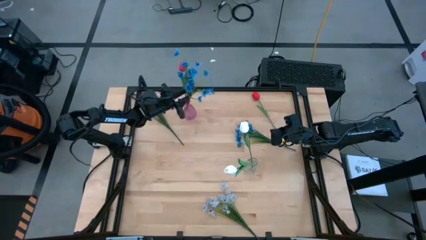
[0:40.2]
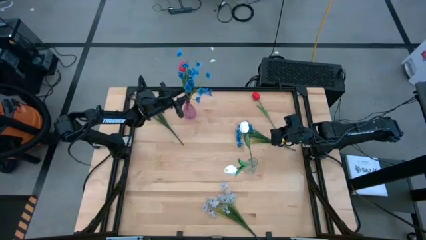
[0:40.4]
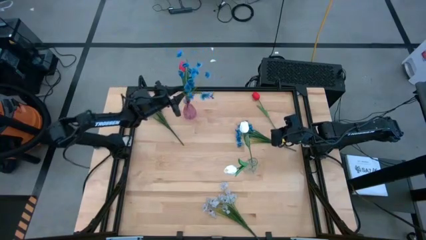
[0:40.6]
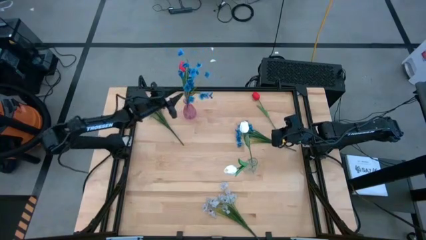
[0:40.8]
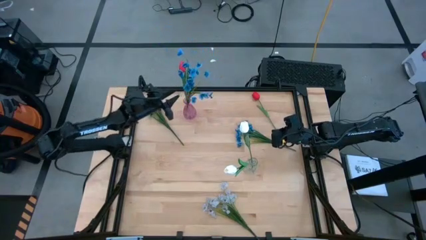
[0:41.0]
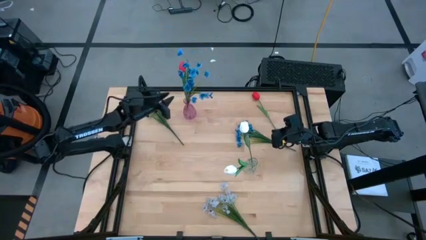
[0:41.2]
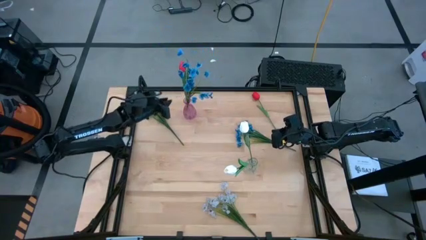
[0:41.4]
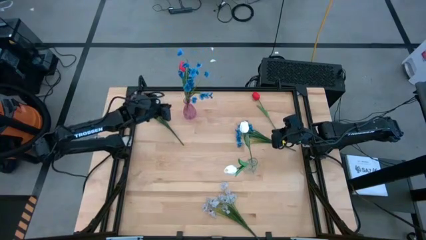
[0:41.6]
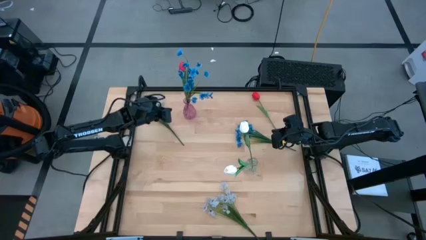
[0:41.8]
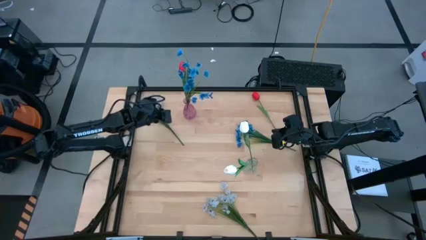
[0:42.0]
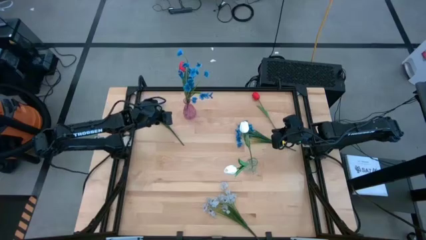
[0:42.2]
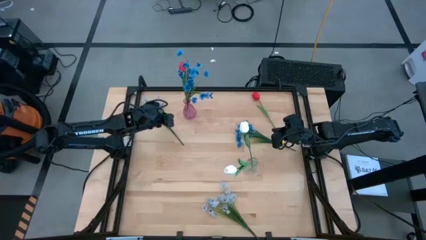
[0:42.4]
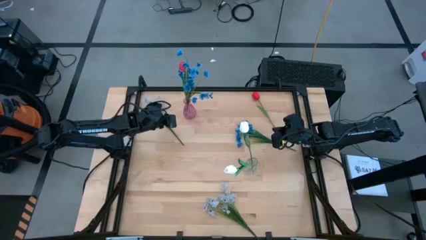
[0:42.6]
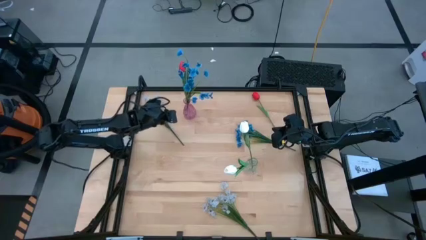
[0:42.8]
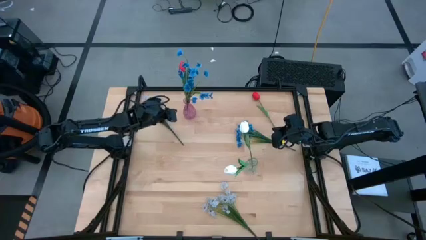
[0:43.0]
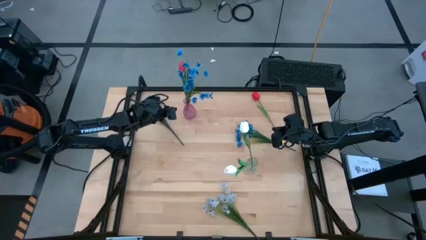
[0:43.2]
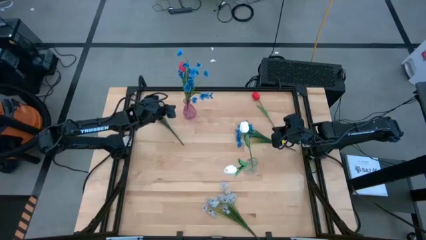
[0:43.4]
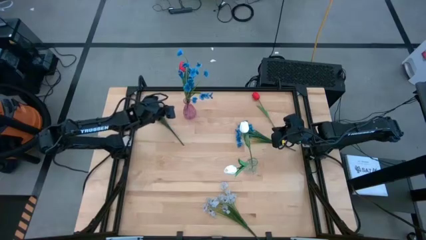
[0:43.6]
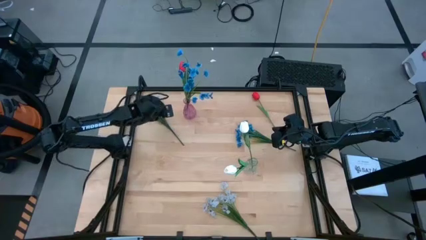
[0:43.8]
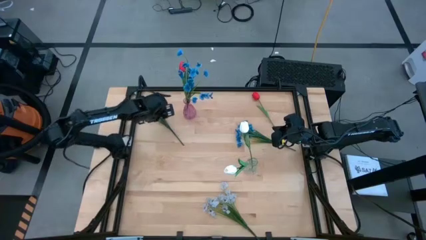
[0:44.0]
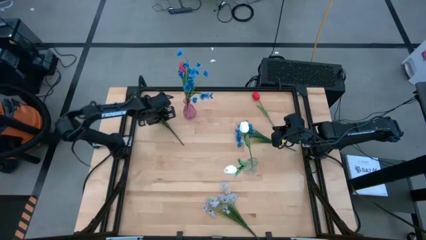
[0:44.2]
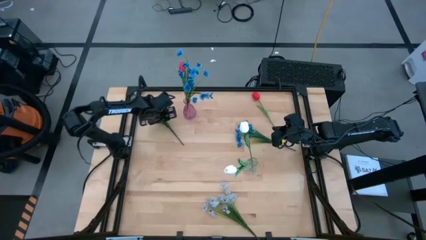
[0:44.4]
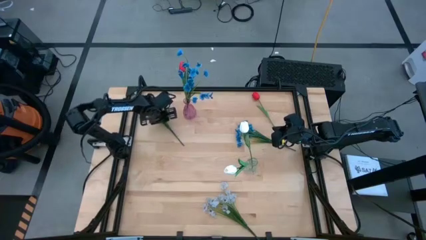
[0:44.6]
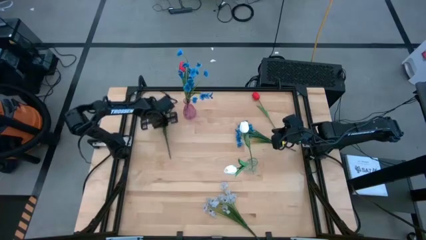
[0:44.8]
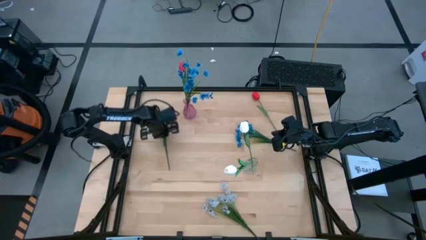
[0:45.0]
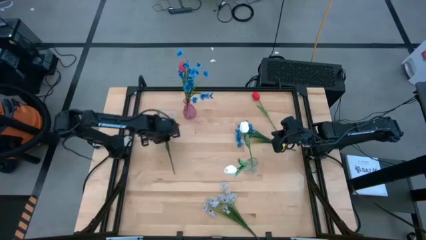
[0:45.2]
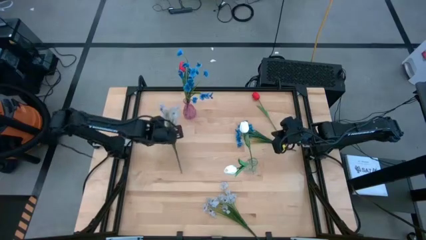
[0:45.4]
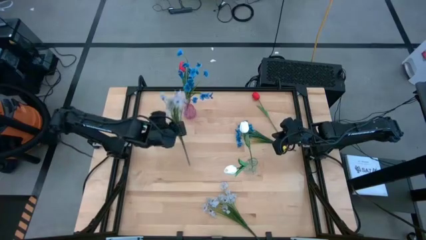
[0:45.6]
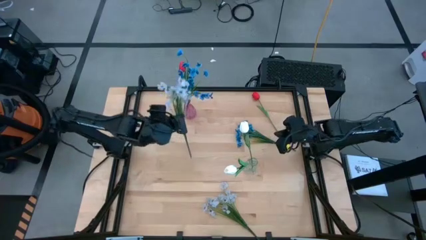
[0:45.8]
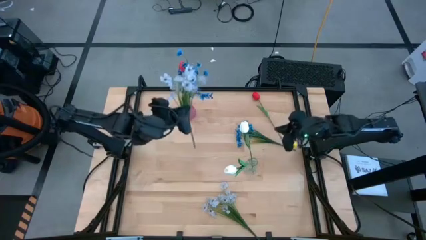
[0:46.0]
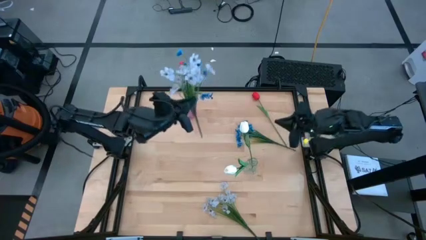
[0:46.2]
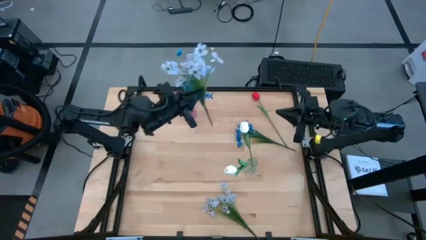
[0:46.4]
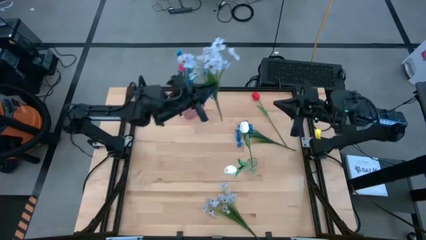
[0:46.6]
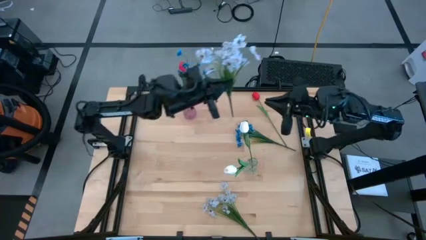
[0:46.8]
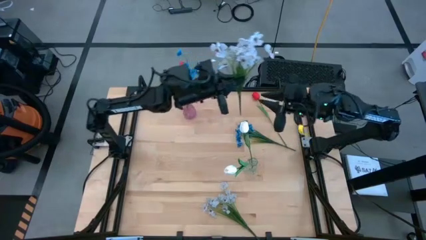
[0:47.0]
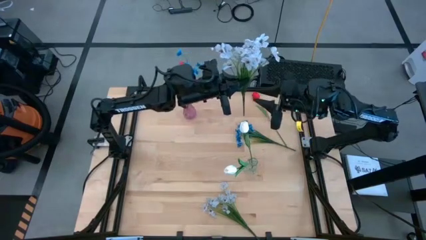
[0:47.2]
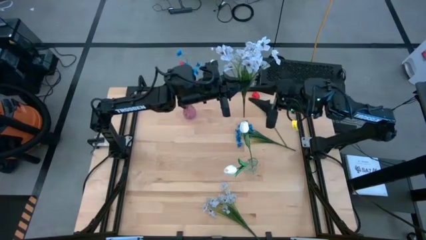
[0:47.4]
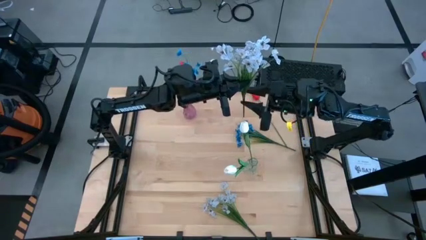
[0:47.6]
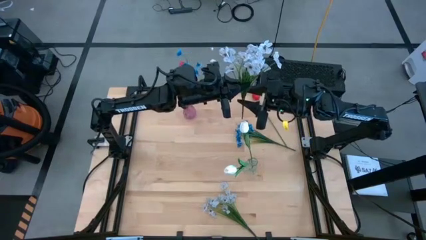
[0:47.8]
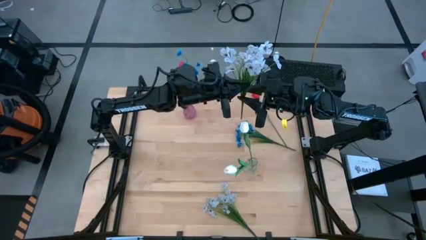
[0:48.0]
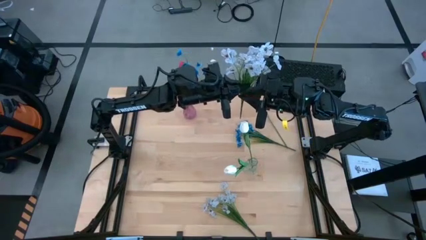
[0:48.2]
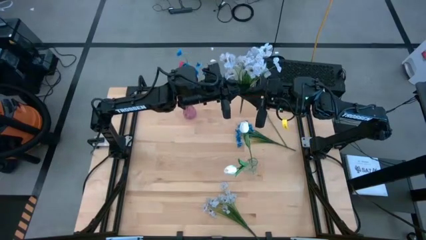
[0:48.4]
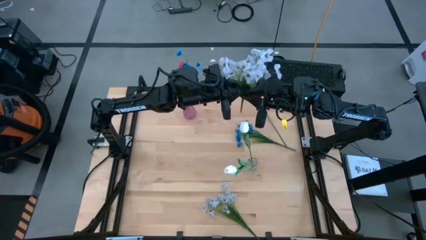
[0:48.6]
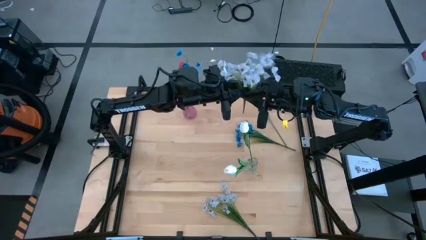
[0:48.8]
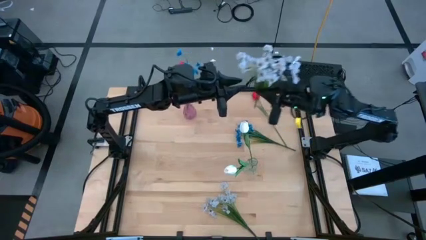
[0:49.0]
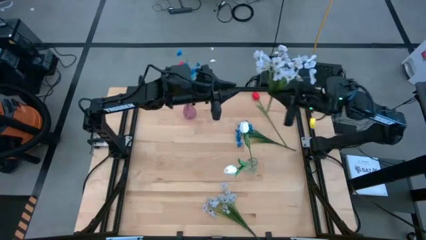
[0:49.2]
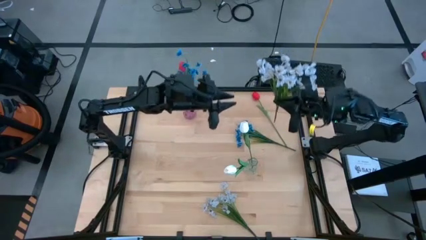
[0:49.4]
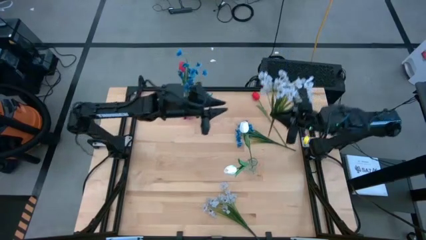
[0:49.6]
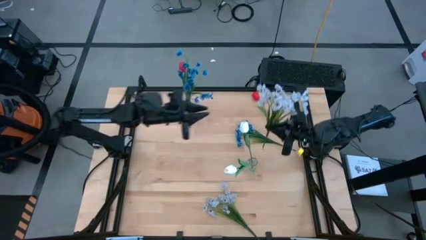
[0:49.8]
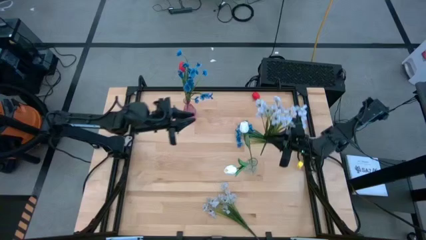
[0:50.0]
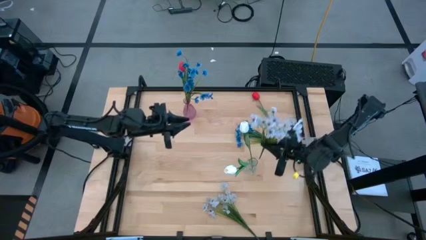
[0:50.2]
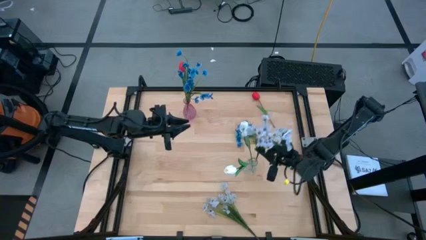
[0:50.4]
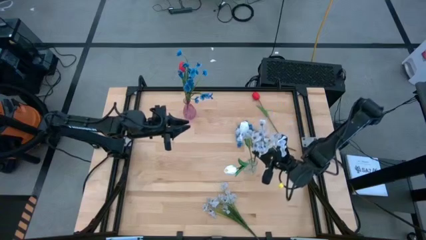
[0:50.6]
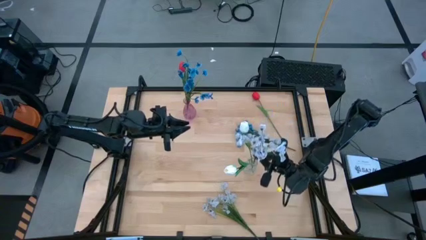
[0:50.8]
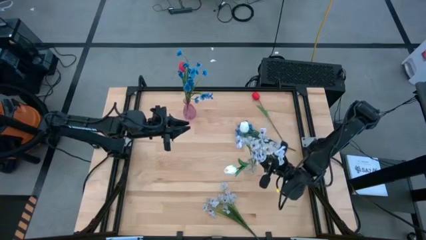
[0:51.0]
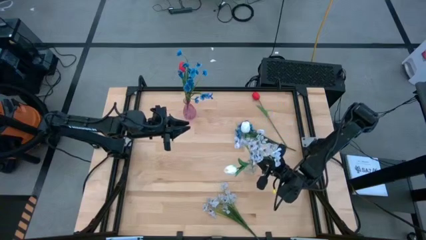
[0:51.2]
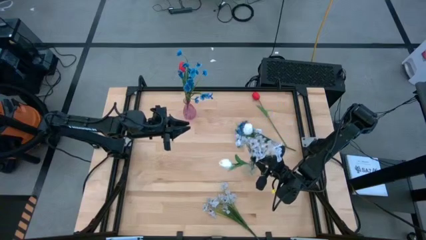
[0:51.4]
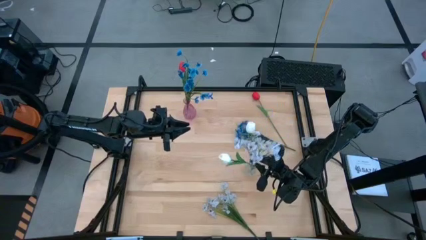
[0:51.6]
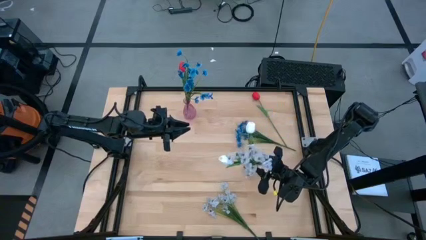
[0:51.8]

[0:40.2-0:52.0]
Task: Sort flowers into vase by color
Put the top white flowers into the transparent vase

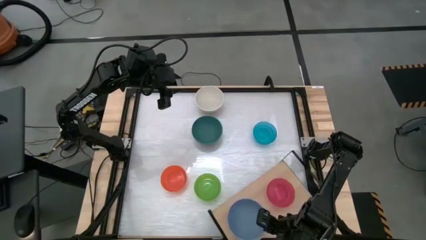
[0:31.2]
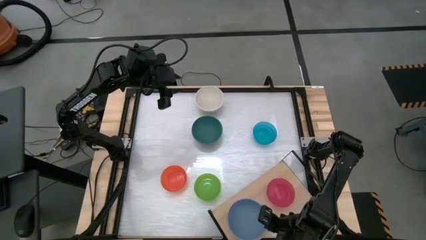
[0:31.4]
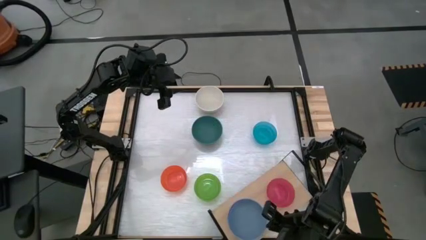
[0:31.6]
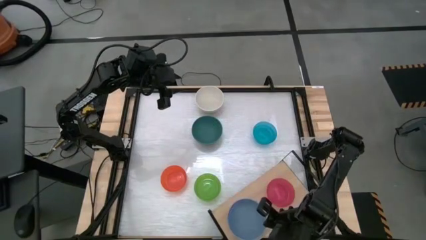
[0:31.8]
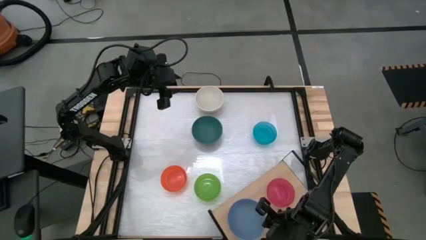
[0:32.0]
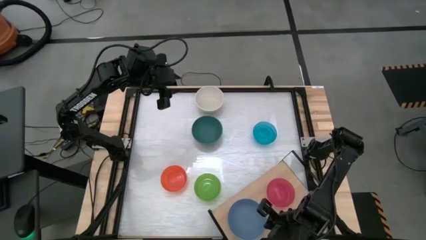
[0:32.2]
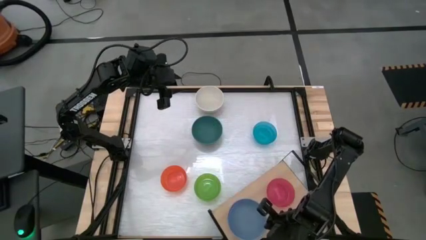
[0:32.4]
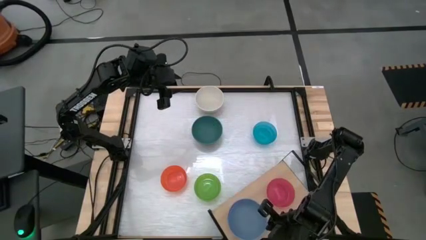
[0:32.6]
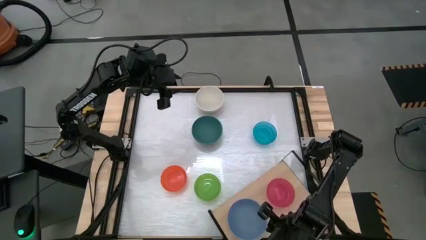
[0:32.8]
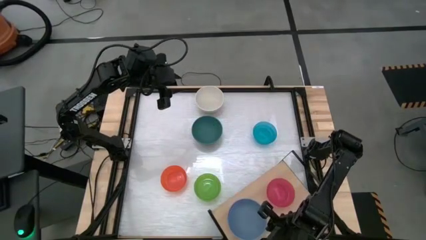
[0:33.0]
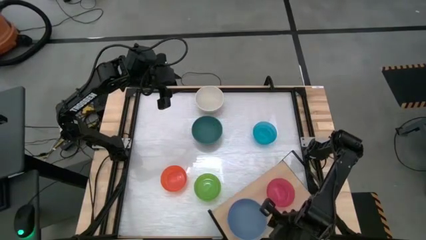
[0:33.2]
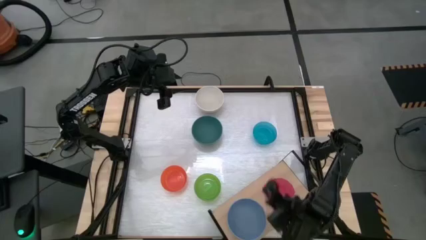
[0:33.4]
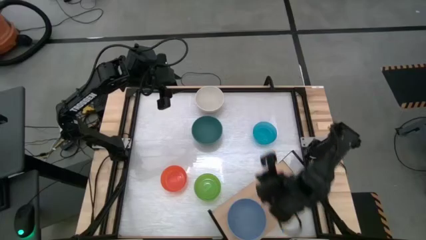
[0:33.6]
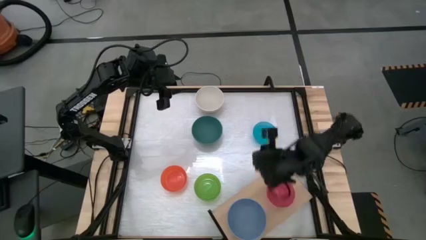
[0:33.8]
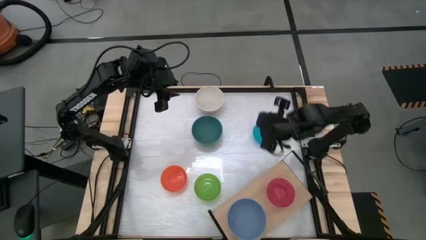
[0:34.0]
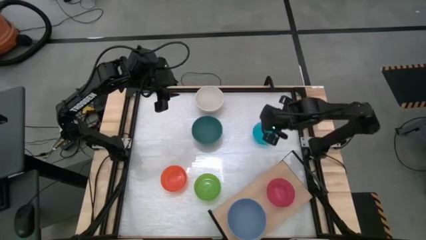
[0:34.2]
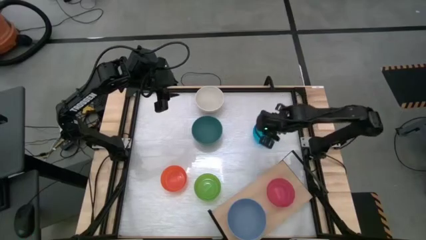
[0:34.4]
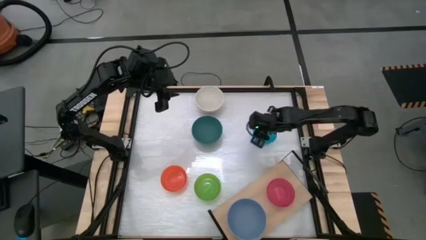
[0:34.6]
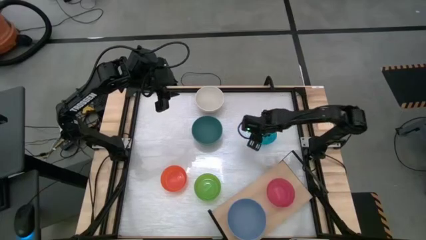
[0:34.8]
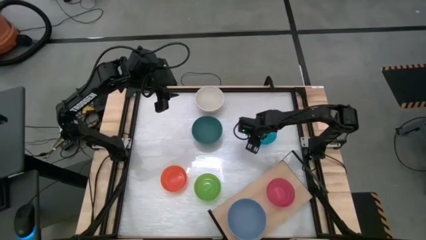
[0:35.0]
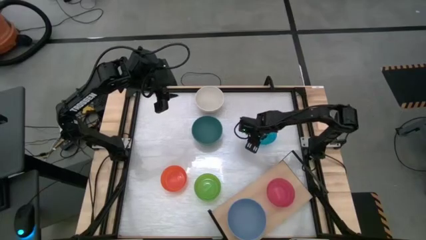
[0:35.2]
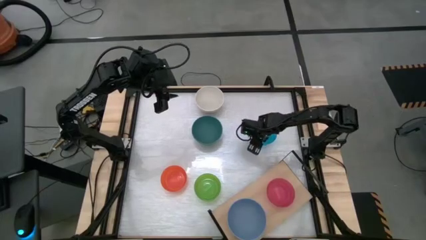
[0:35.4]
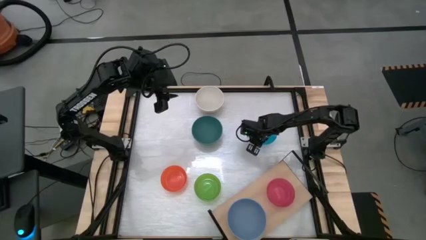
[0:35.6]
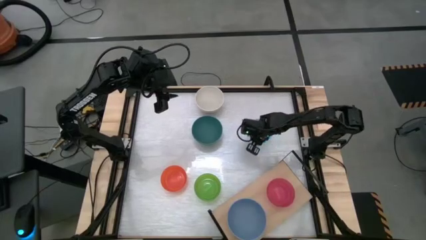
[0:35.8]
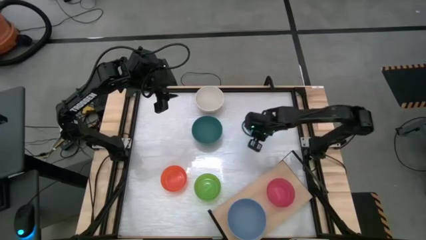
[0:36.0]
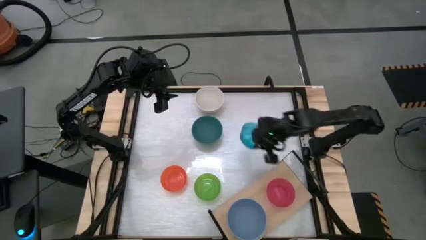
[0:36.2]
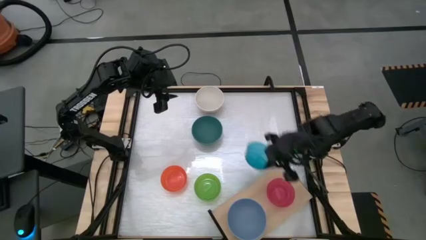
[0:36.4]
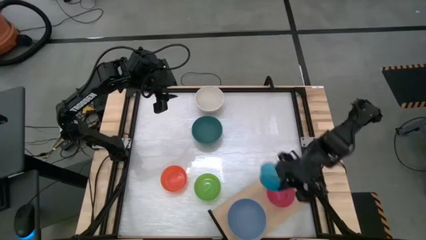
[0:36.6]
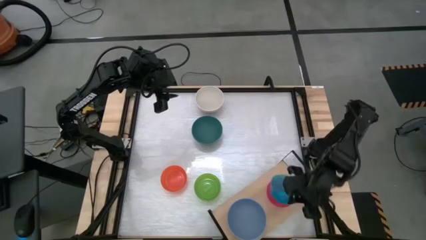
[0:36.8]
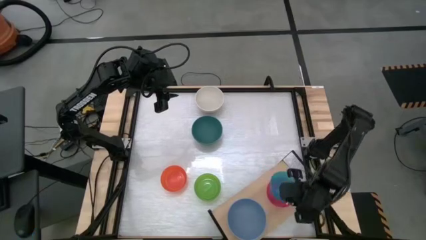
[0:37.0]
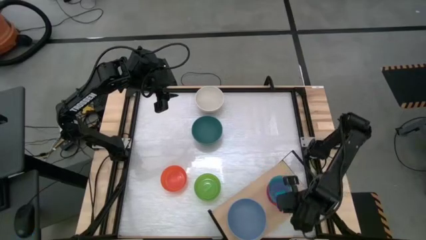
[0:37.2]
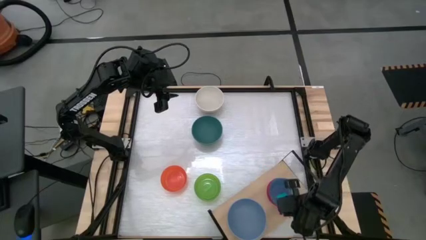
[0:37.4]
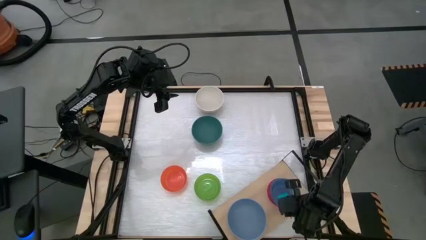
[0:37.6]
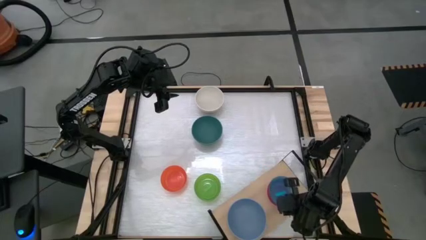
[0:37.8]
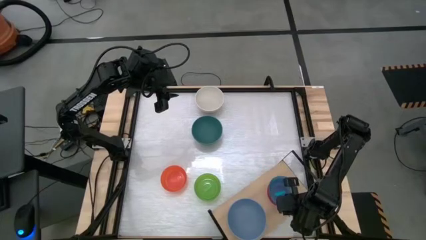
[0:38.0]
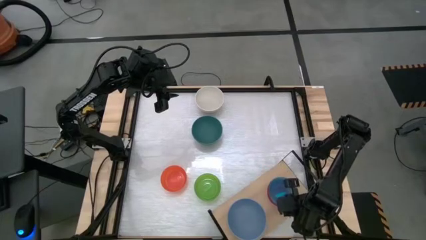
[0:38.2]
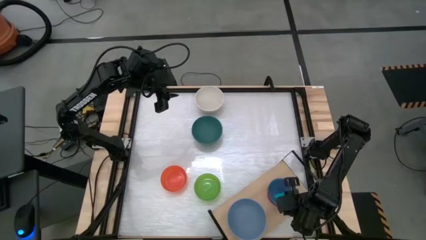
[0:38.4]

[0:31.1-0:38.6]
Task: Place and stack bowls onto a shelf
Stack the blue bowl on top of the pink bowl on the shelf
